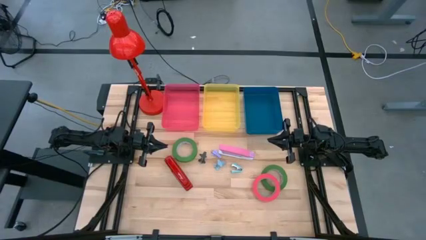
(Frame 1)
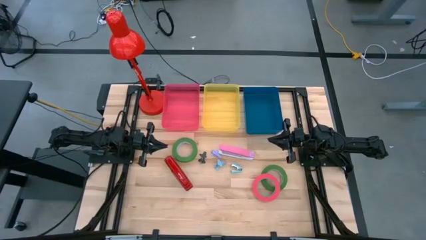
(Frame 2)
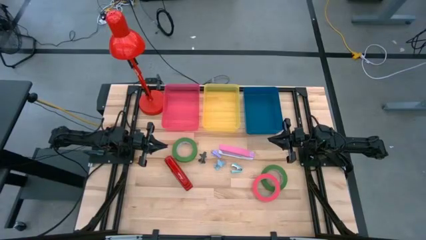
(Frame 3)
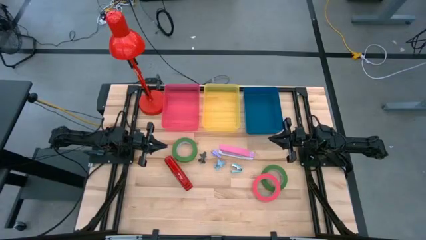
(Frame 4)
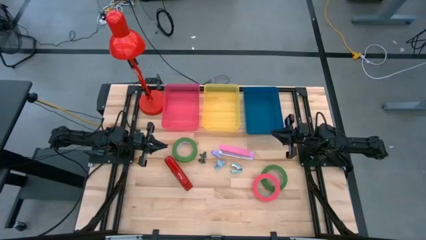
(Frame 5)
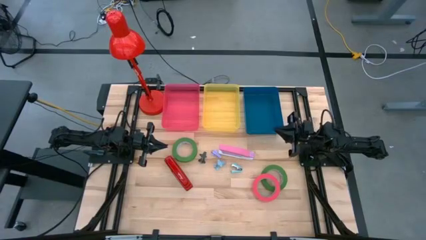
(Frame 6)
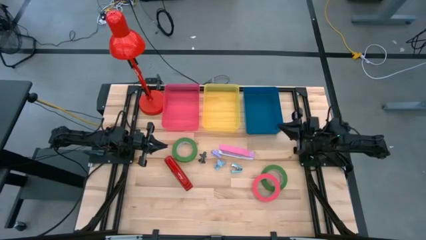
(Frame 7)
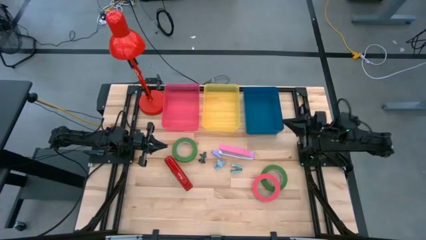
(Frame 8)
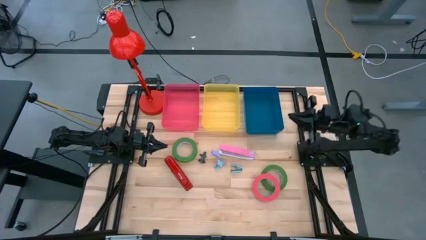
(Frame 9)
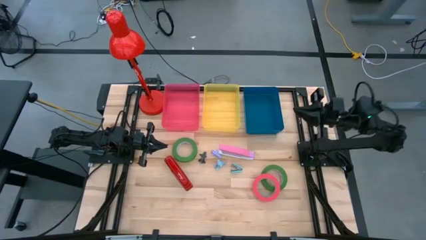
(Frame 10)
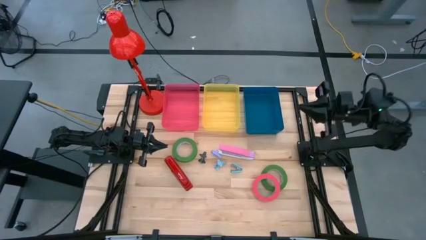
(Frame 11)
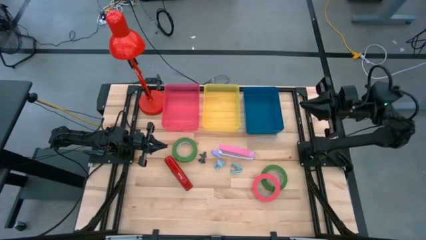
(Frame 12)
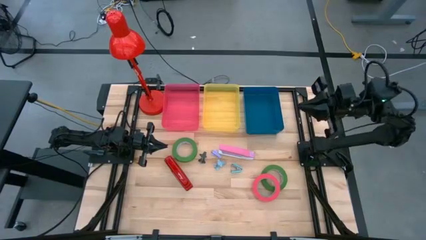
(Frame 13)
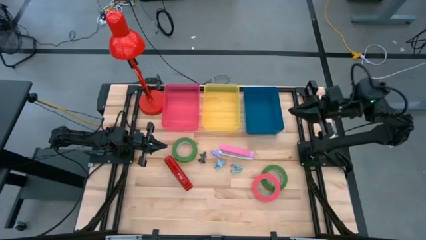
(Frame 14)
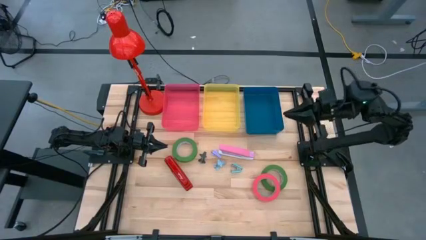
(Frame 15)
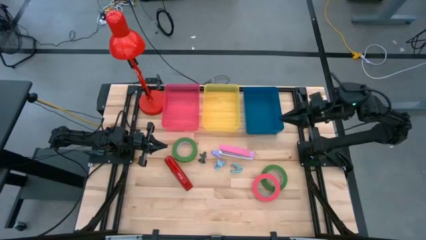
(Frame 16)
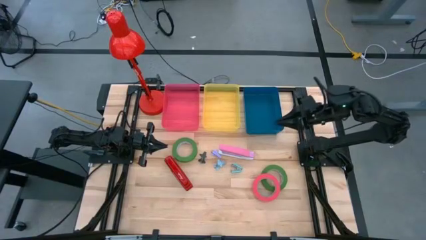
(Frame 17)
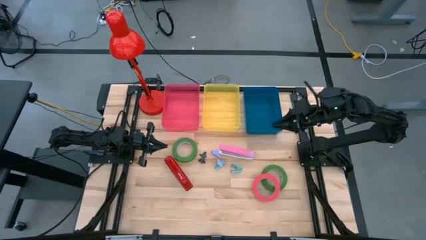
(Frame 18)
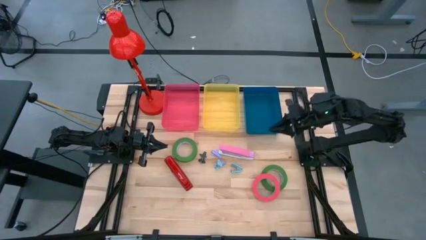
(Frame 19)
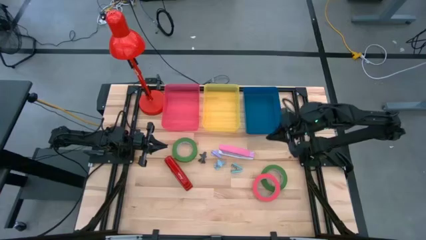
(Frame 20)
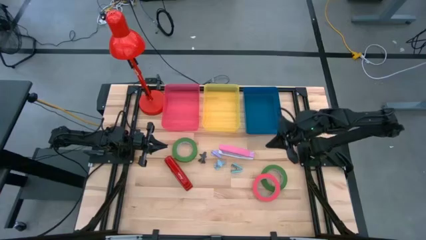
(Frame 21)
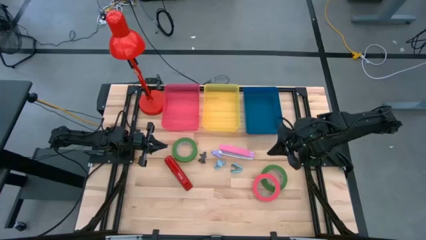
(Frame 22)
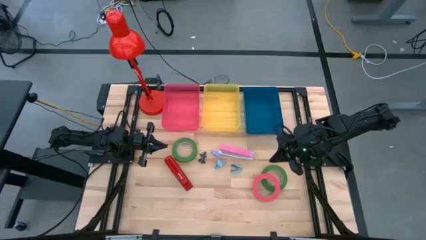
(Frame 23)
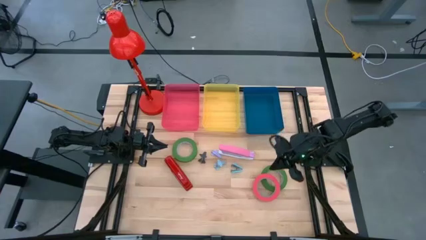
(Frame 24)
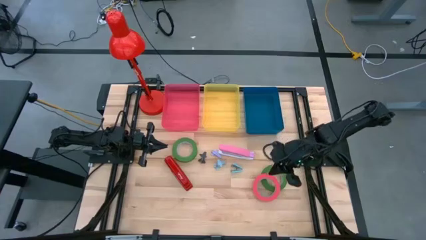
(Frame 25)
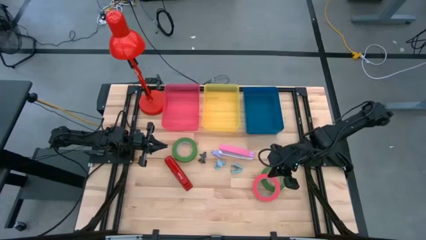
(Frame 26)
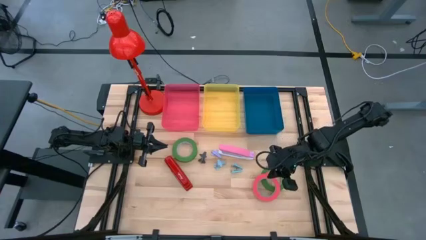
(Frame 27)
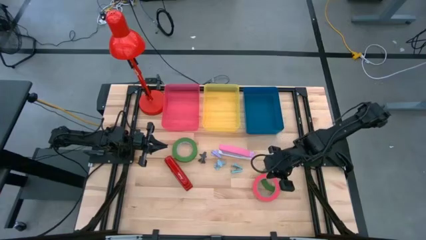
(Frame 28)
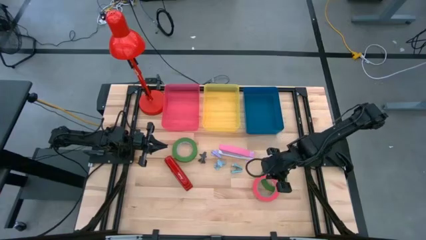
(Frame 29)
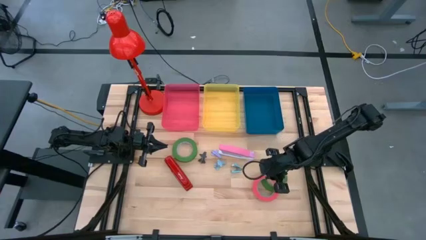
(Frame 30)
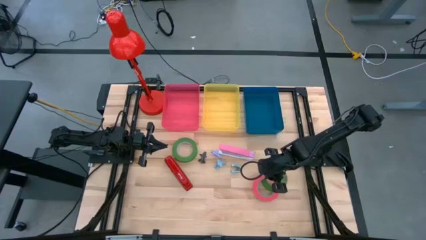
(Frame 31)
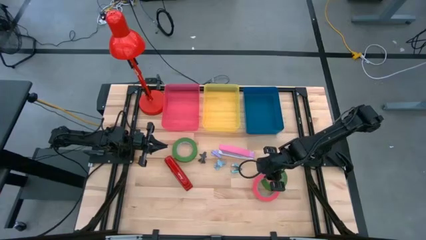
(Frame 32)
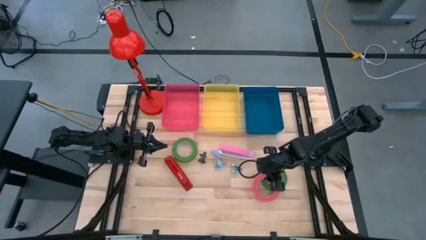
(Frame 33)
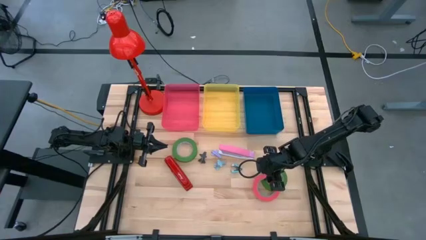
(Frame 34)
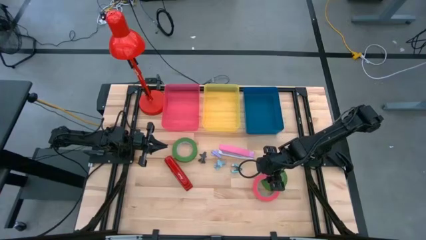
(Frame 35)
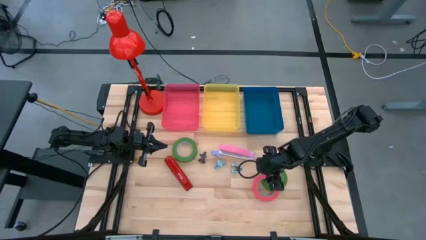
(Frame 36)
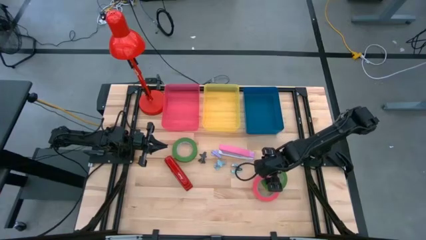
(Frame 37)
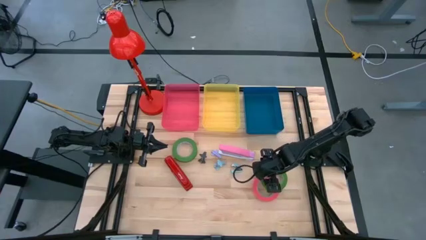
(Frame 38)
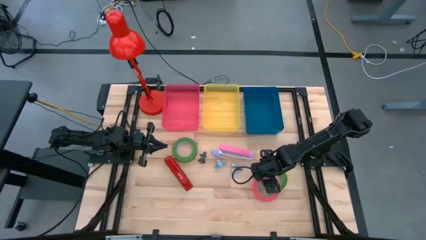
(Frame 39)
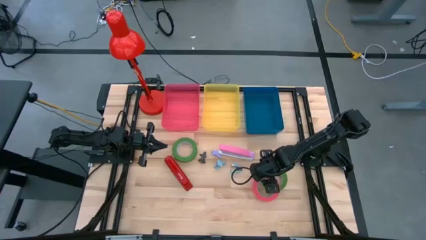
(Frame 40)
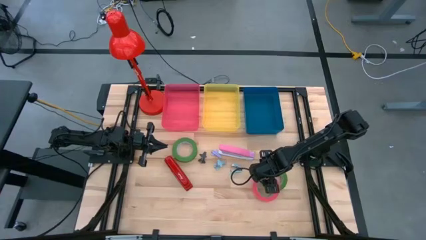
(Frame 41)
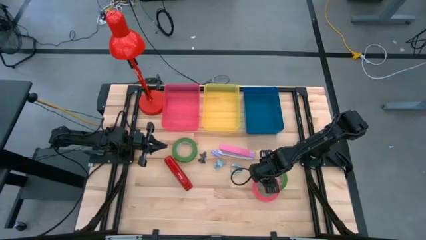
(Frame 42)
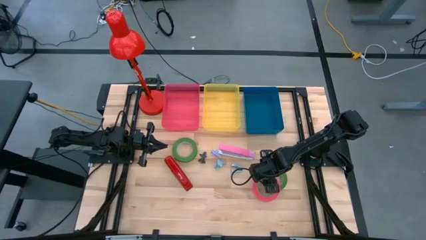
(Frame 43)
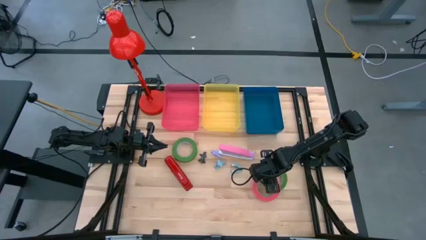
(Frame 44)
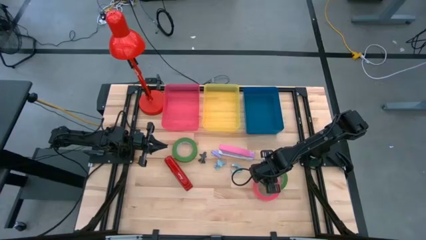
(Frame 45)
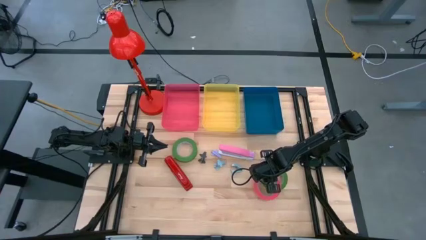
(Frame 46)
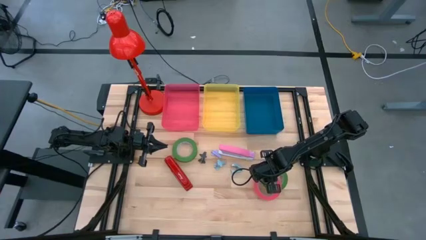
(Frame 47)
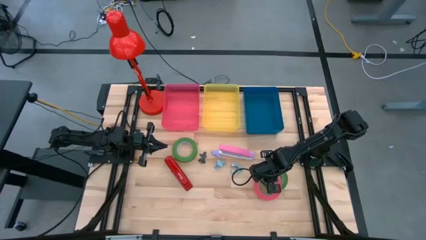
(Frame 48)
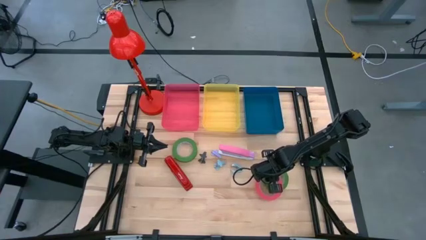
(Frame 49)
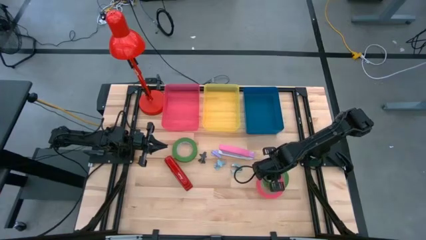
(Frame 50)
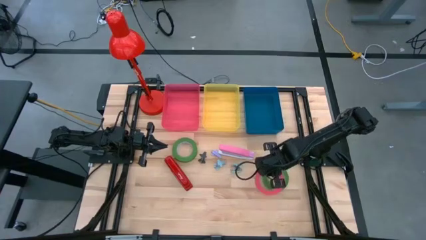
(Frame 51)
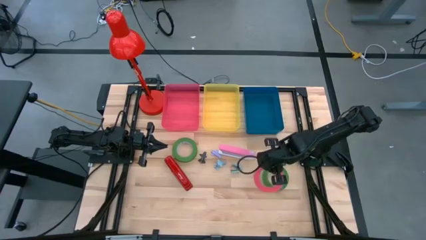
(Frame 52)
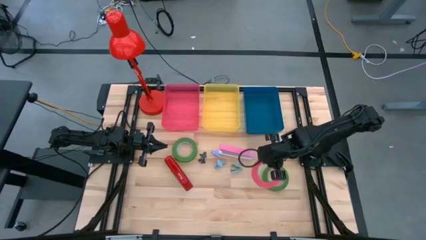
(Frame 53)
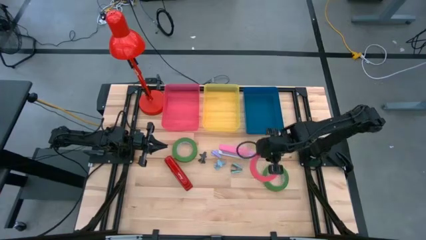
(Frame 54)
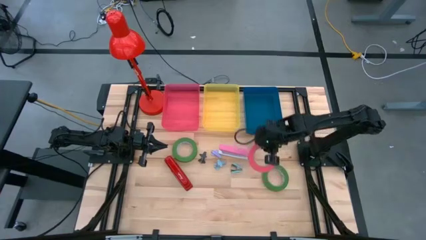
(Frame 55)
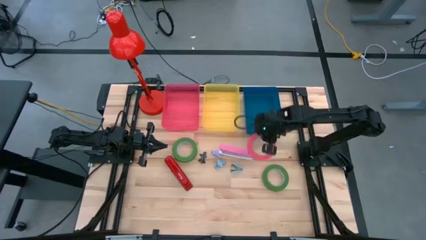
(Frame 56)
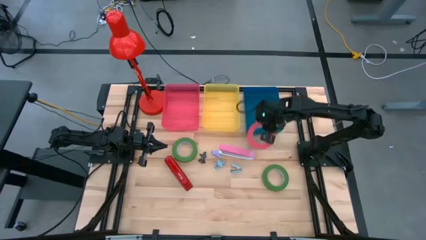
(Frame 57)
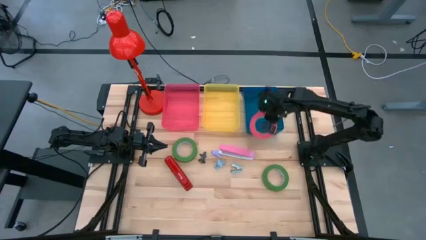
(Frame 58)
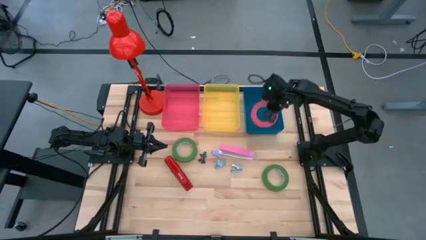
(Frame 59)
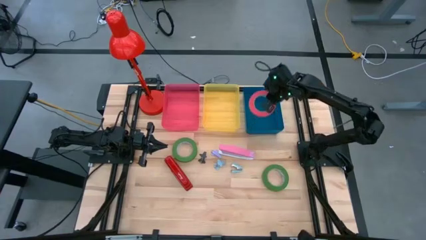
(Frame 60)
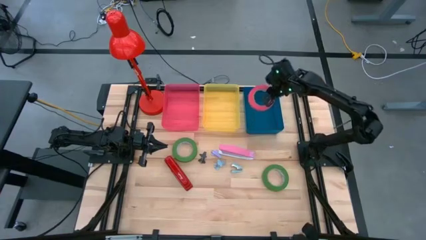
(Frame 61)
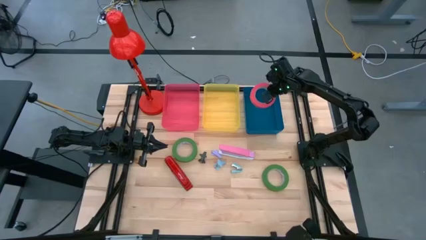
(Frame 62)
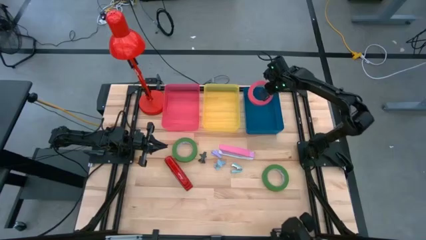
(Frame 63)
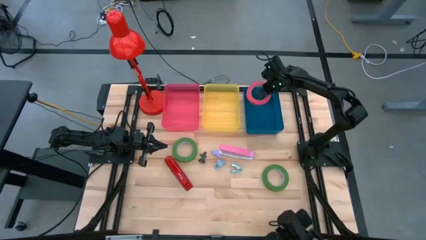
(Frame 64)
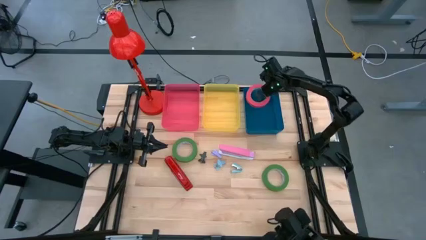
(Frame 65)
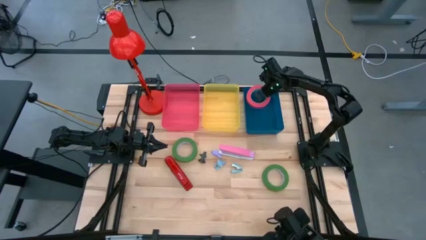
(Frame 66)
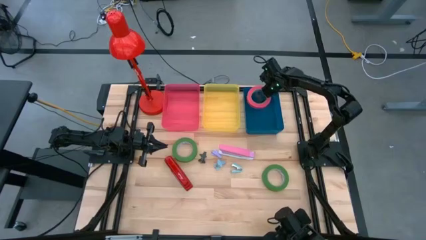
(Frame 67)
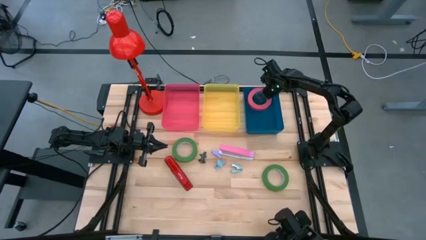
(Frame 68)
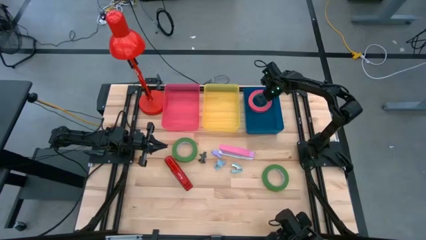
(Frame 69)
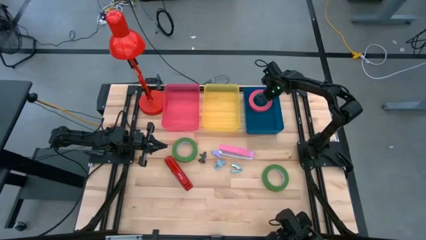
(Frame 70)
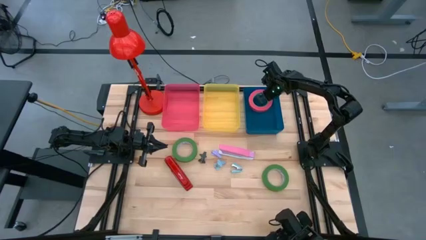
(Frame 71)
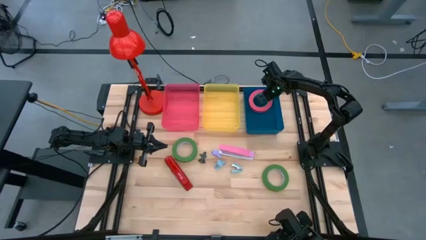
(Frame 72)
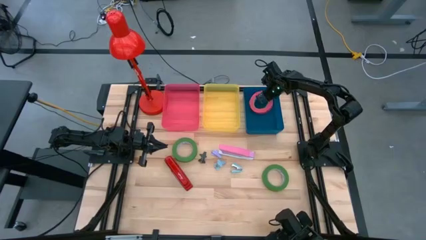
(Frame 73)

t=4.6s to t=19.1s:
Task: Pick and place Stapler, Stapler remover, tape
Put the pink tape into the blue bin
